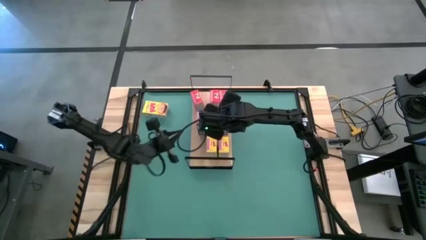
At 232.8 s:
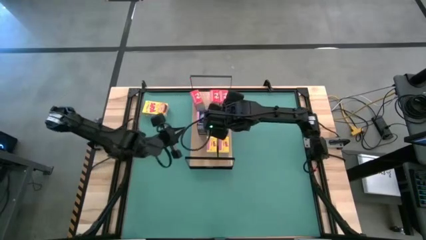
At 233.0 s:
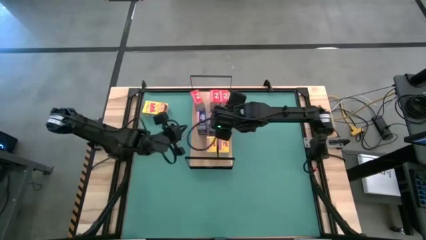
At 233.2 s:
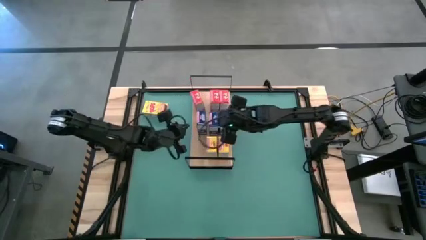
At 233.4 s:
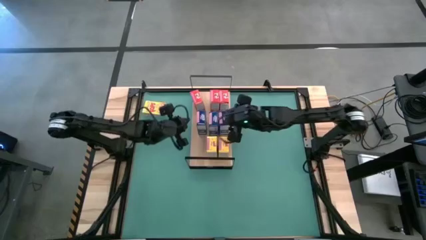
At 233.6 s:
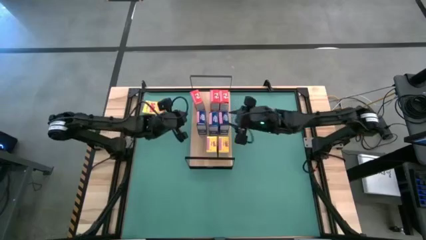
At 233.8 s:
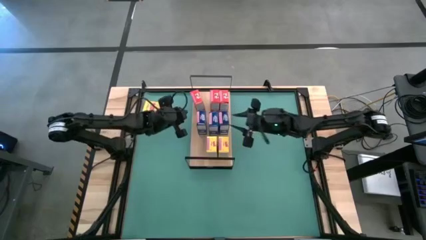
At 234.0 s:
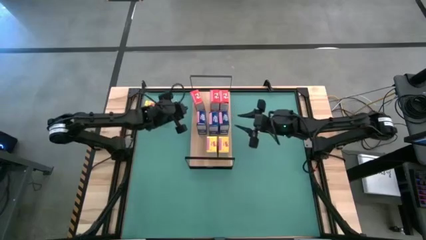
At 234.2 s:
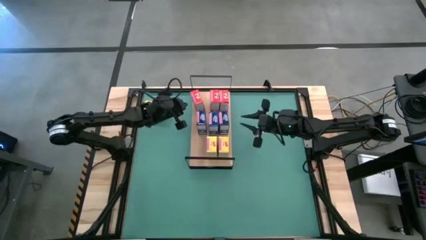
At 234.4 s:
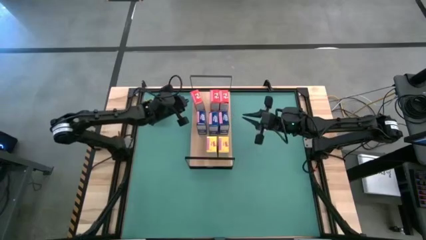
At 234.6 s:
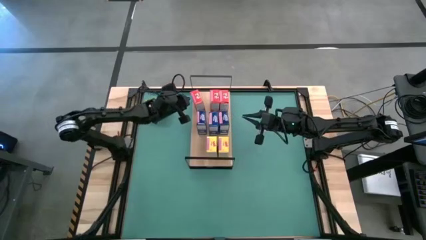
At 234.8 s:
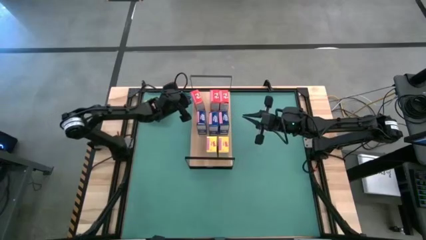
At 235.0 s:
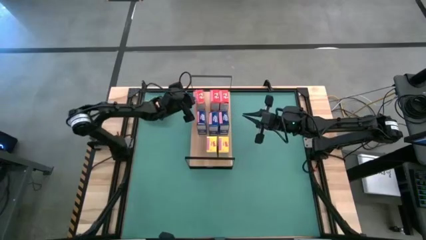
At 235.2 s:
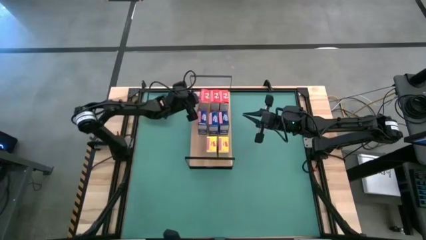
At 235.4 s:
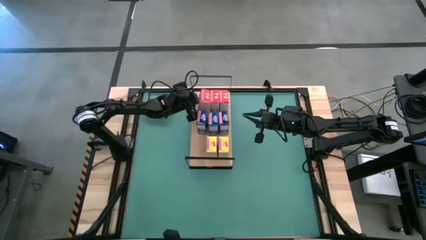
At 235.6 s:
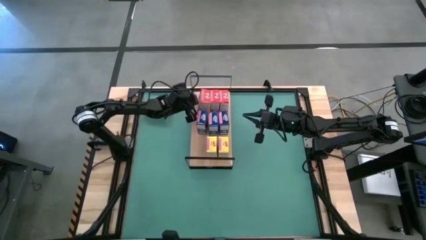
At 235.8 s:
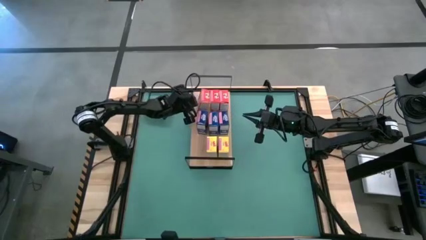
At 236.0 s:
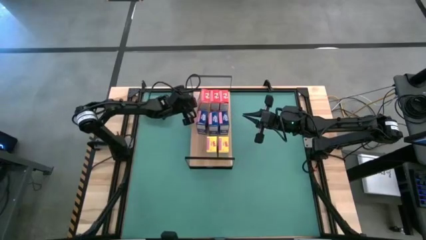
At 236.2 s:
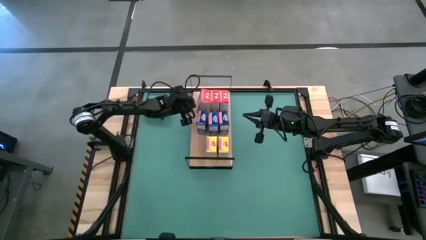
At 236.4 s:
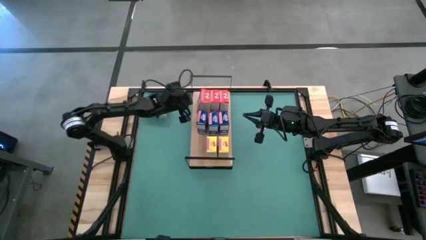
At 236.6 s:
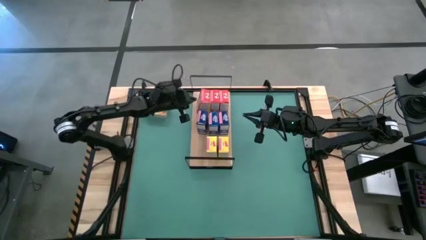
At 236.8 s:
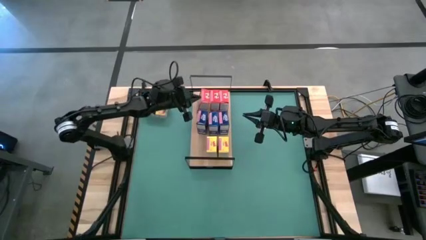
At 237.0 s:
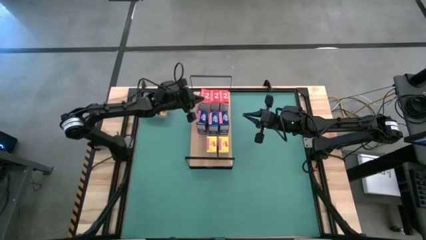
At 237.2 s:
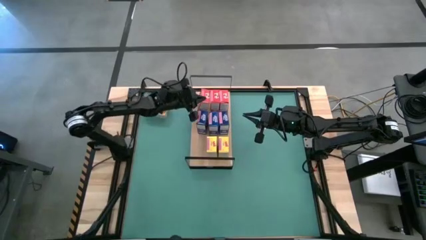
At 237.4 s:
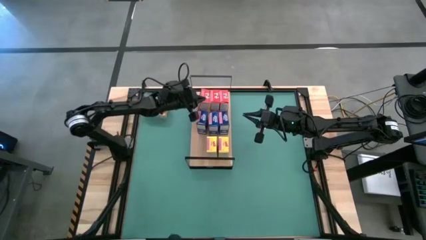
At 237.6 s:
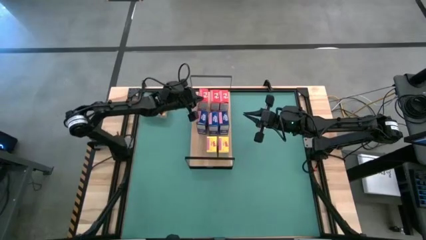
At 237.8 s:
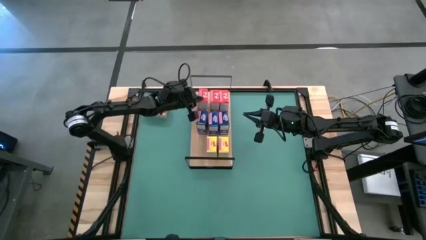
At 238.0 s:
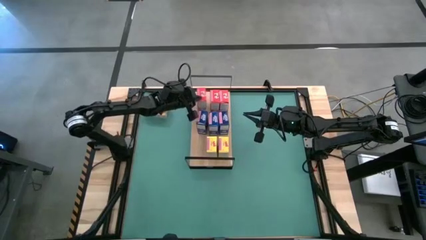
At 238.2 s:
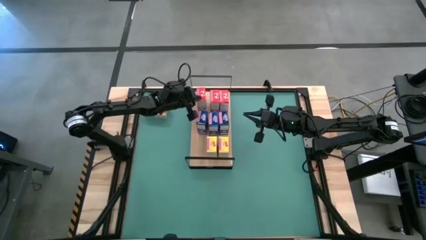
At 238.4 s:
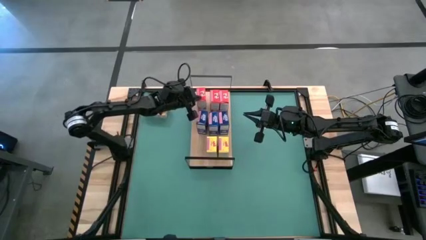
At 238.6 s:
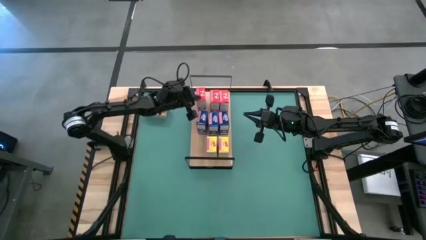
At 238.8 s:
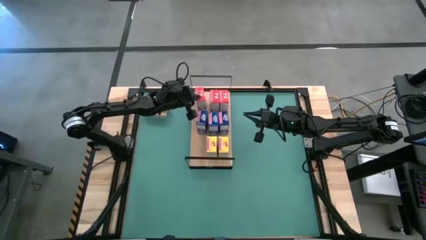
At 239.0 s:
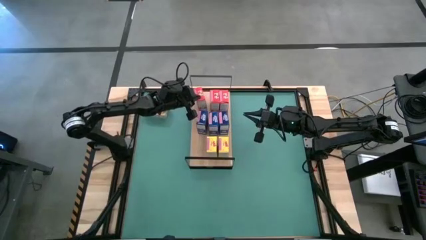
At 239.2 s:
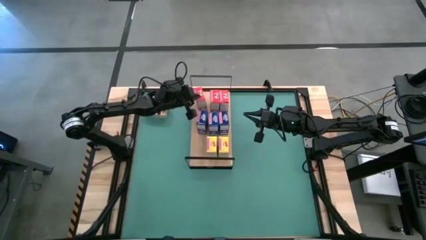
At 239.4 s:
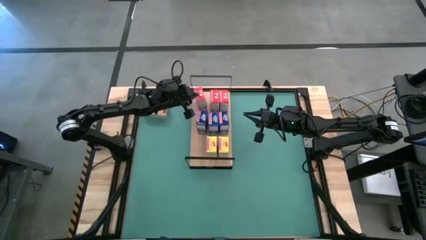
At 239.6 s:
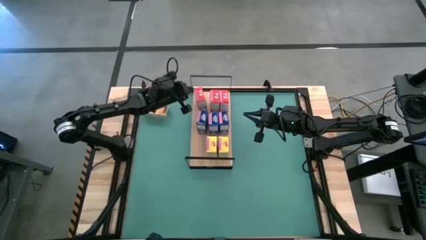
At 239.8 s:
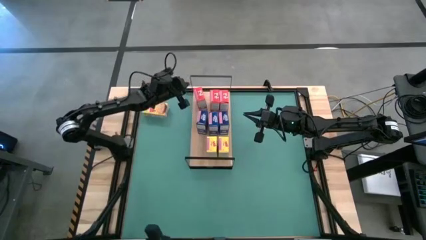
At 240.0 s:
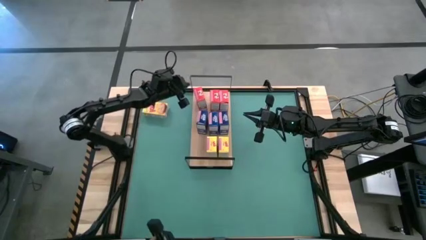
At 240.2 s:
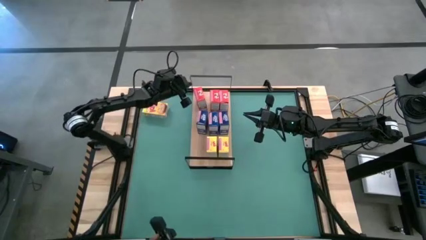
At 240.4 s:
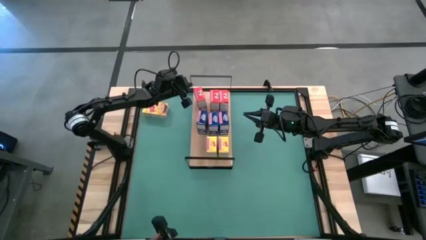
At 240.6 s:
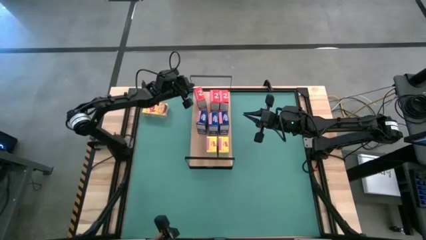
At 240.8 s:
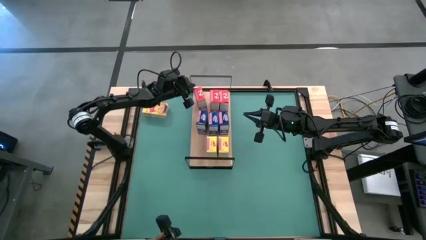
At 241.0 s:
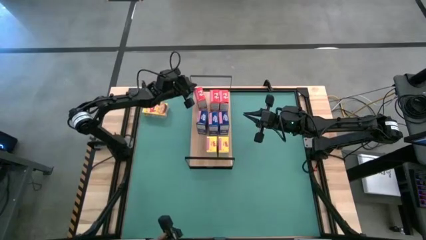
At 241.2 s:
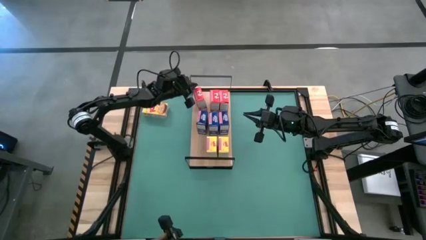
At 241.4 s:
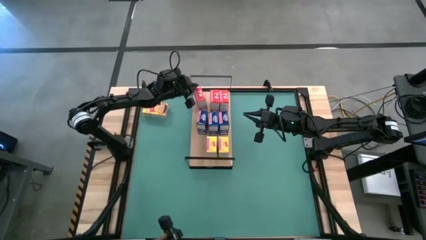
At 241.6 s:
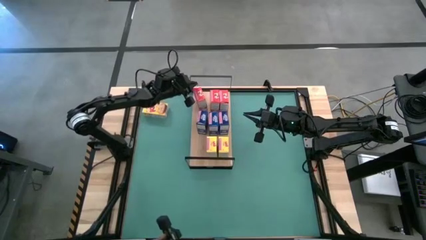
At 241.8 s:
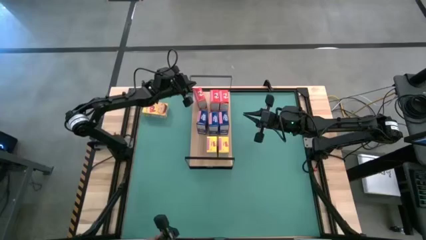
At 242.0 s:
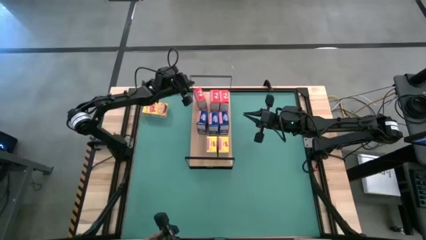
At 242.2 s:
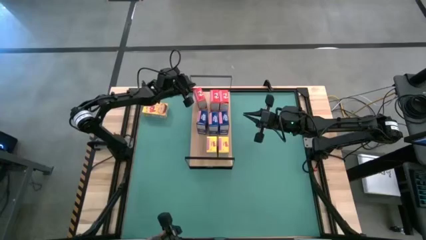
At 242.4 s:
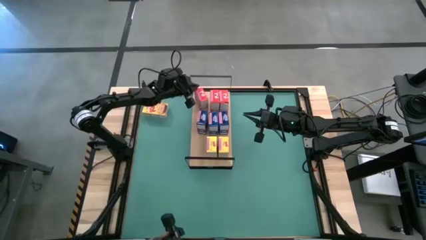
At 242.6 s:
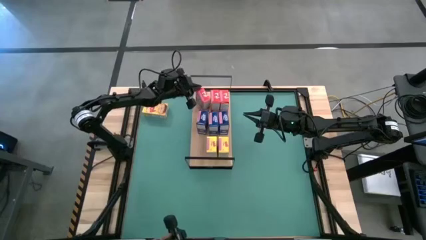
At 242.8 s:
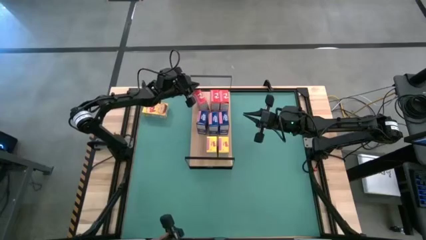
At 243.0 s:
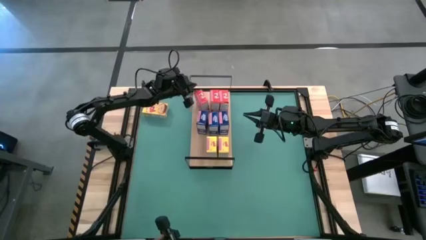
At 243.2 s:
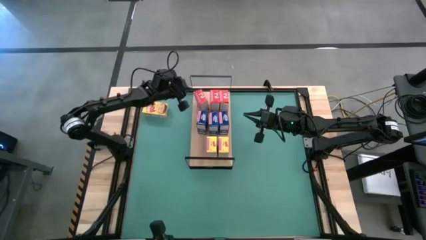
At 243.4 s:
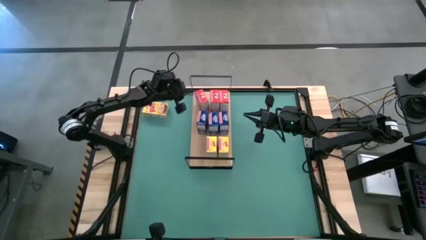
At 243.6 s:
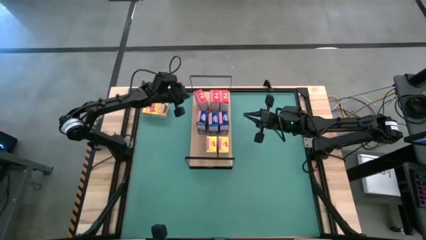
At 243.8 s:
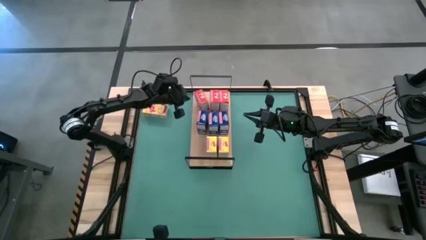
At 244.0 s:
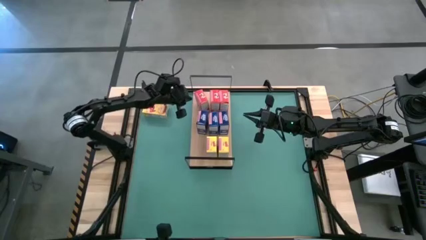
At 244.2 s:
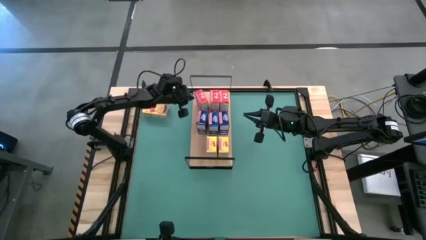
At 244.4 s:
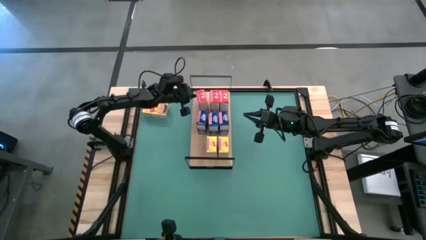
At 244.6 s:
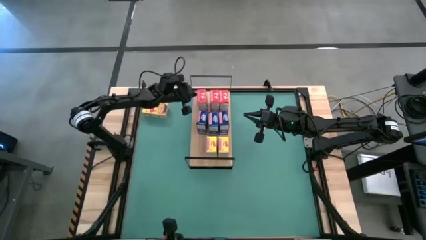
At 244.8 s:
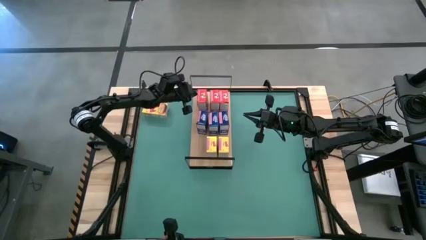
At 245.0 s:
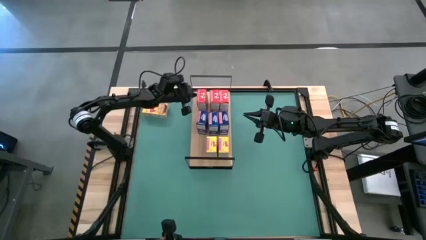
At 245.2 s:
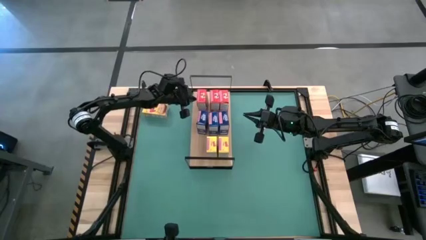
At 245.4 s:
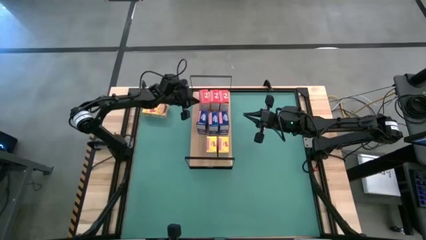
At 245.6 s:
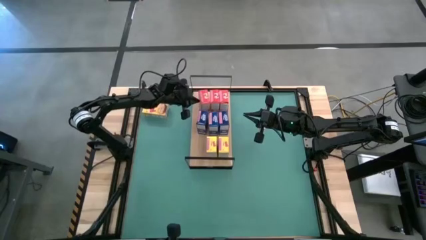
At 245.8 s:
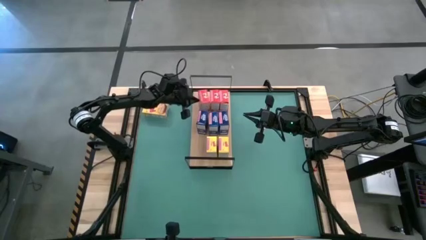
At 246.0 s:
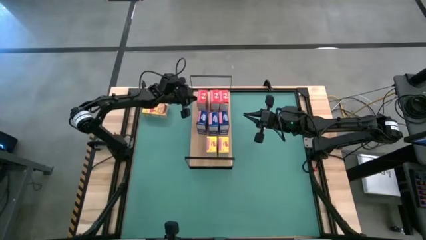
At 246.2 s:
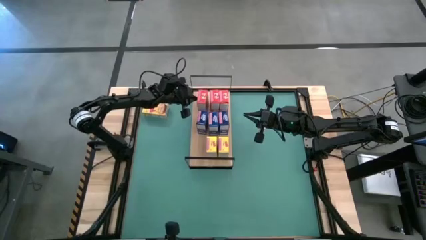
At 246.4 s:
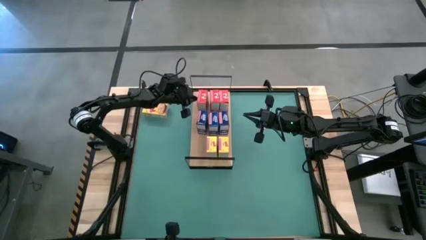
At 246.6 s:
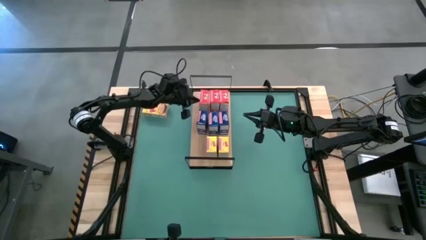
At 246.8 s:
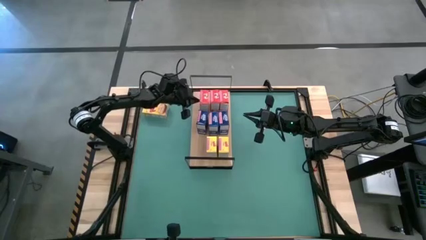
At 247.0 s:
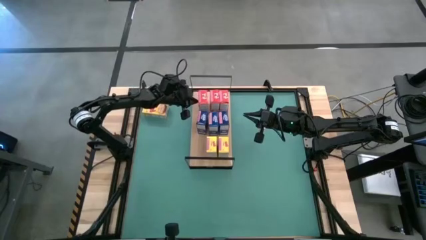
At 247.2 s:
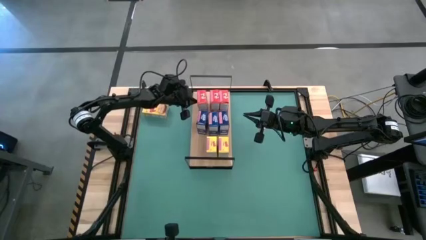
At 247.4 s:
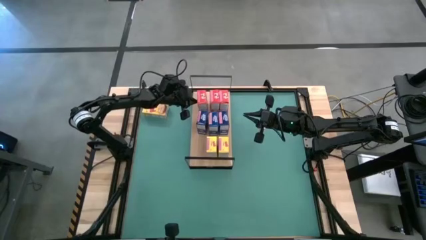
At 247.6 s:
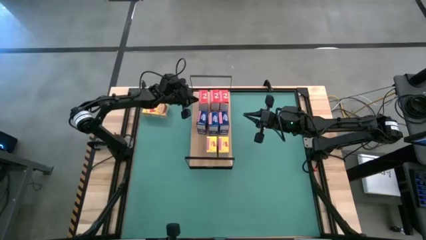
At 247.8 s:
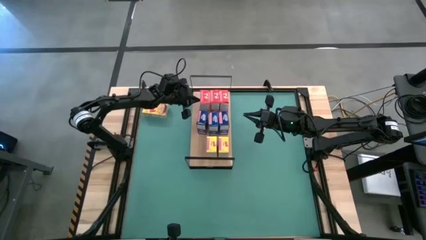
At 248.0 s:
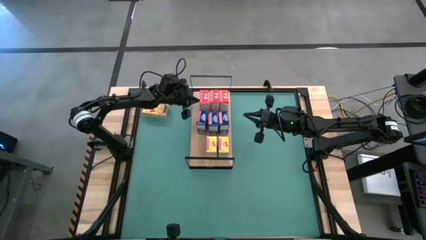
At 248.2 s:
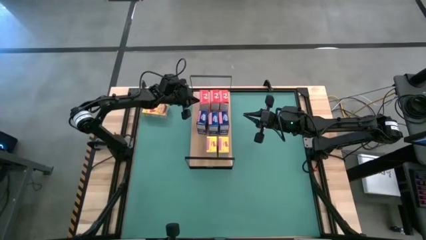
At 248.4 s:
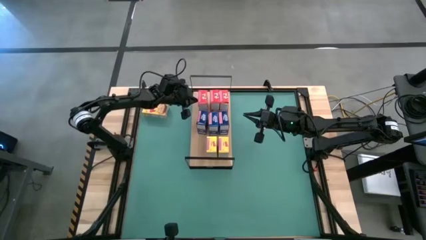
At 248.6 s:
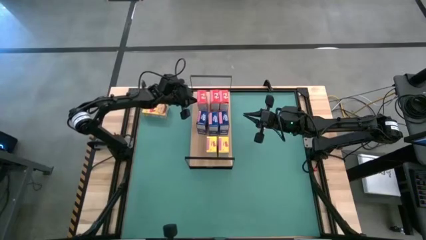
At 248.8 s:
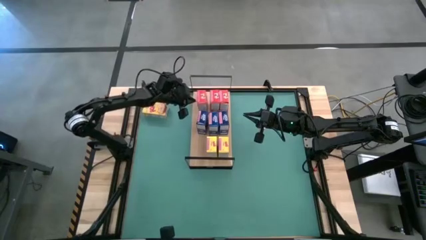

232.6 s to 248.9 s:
Task: Stack cereal on shelf
Put the red cereal box on the shelf aligned with the other red cereal box
